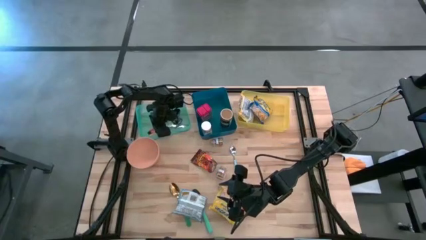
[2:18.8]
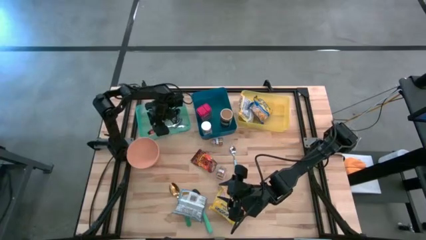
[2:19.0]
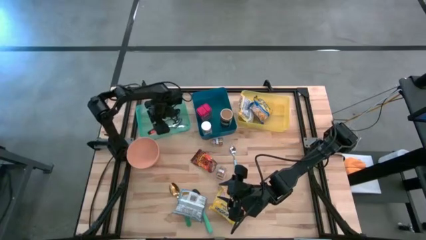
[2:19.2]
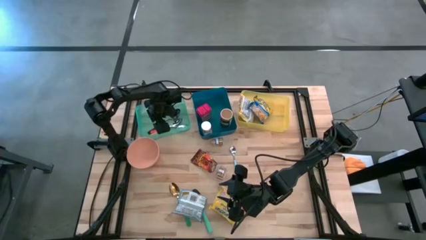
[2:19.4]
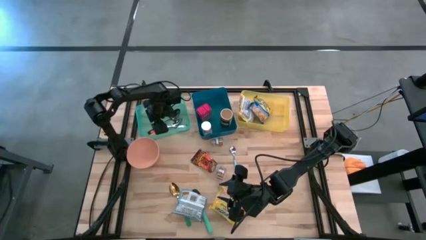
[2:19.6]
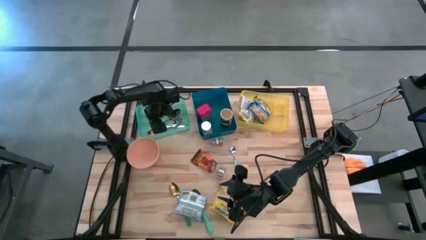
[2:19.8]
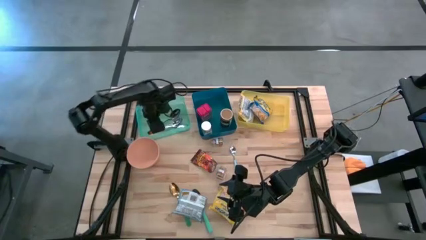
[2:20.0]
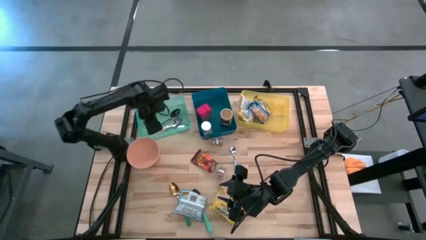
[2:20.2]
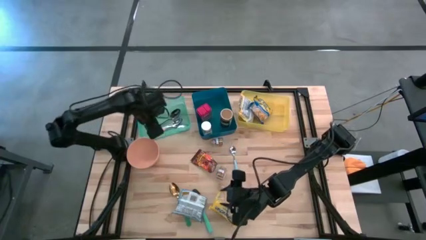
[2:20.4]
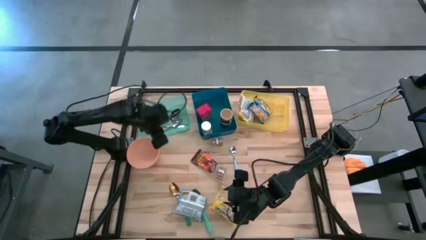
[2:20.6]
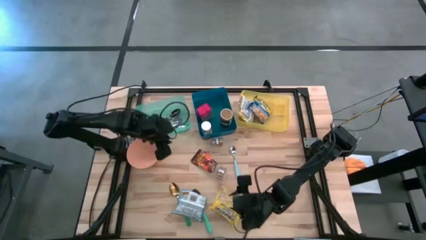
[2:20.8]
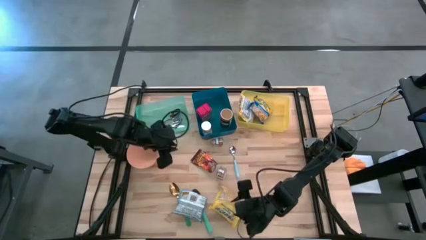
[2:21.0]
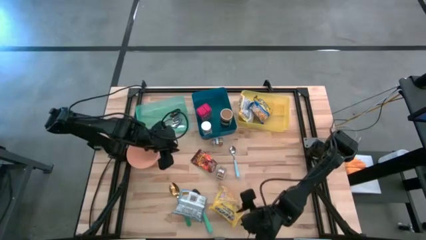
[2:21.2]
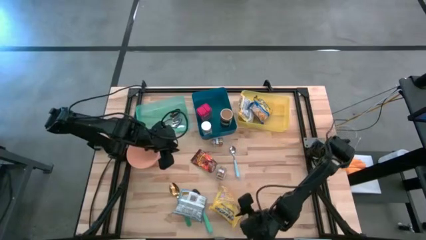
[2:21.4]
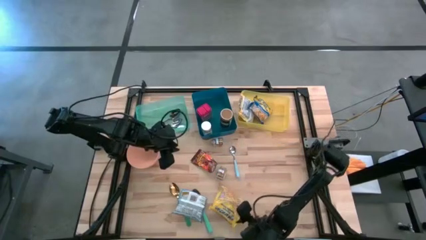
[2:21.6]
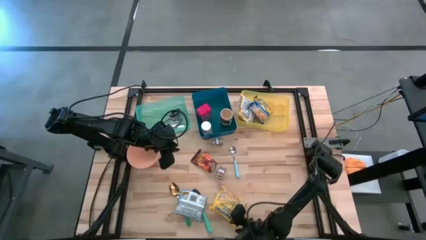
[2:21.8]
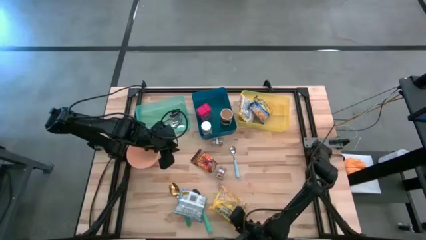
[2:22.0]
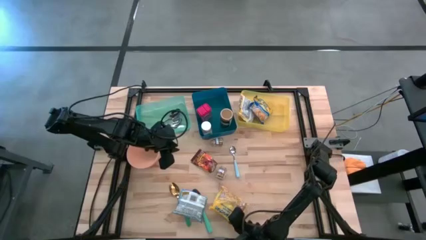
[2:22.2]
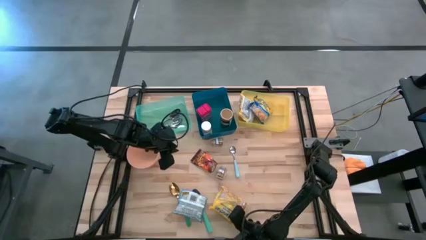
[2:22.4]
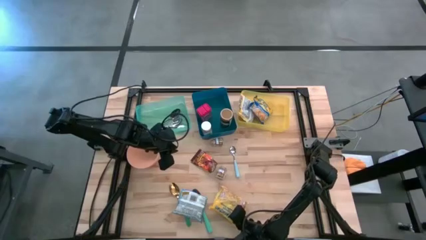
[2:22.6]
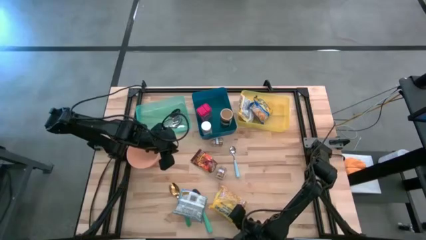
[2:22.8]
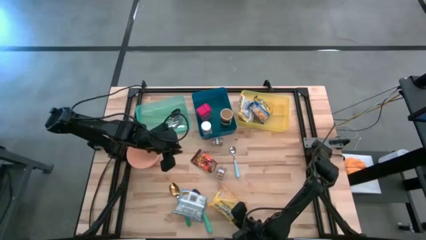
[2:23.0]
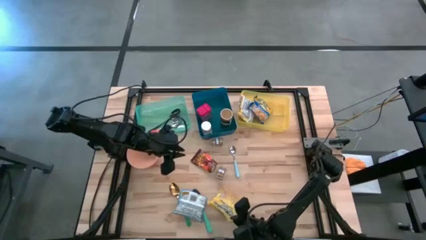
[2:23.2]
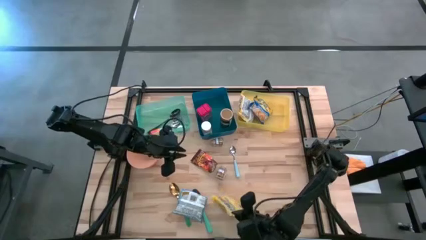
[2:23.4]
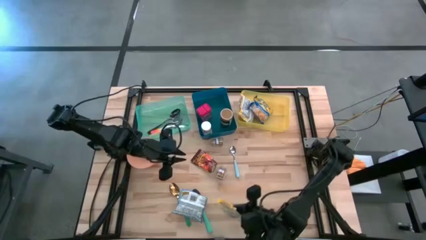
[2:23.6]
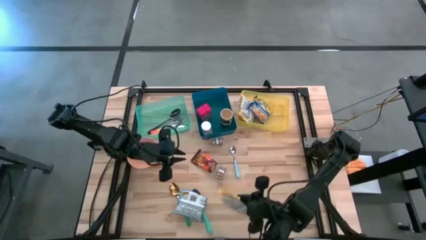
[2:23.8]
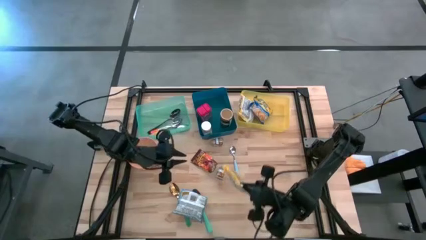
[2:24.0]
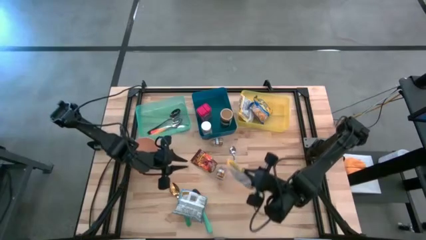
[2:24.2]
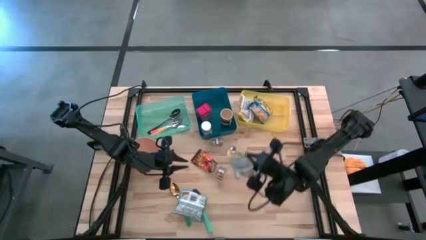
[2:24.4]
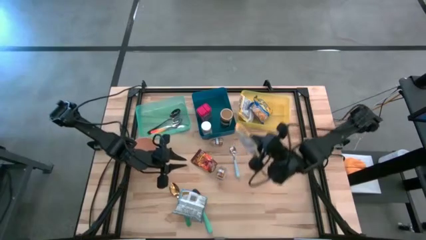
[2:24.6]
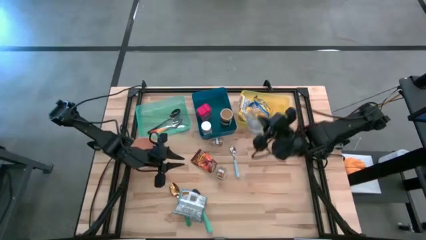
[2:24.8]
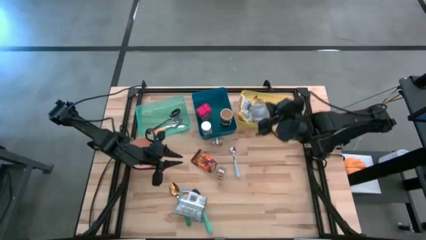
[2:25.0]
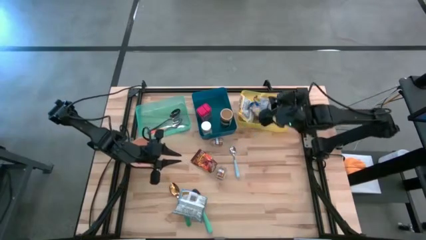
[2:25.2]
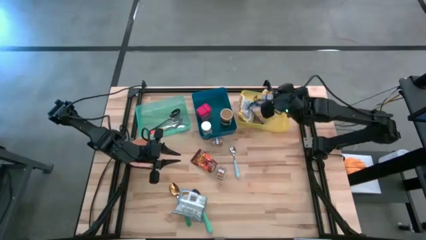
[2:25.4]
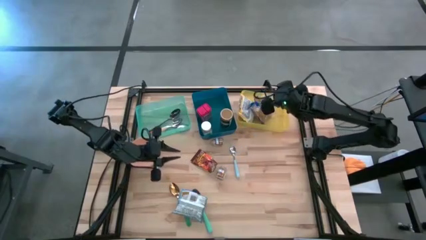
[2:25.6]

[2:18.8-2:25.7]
Put the yellow noodle pack into the yellow bin

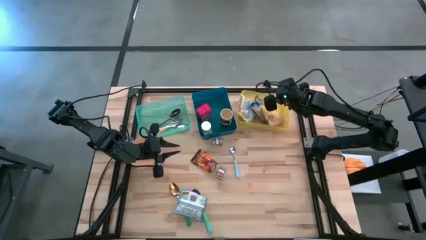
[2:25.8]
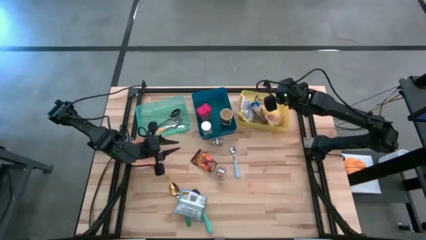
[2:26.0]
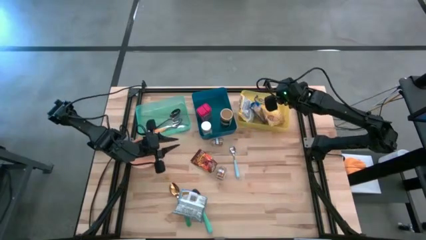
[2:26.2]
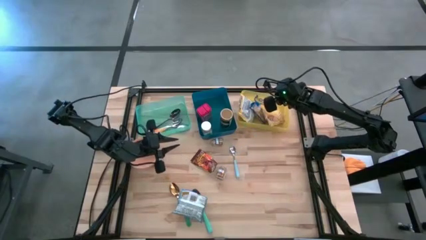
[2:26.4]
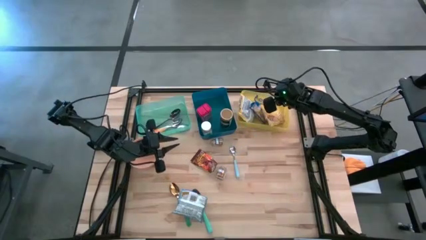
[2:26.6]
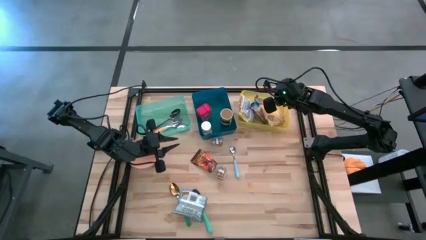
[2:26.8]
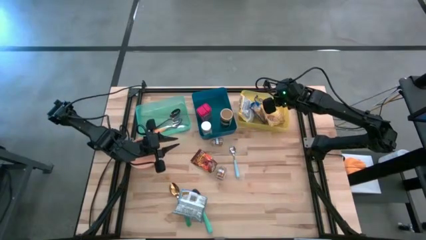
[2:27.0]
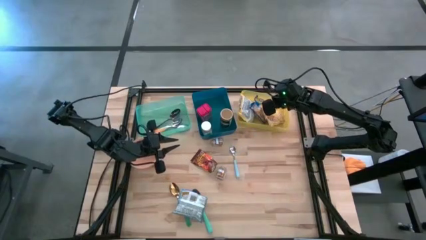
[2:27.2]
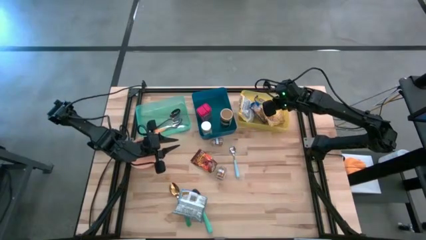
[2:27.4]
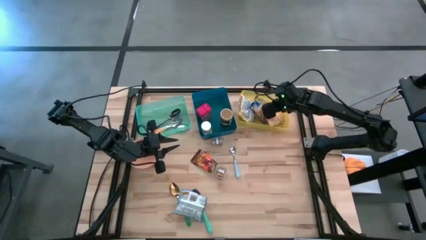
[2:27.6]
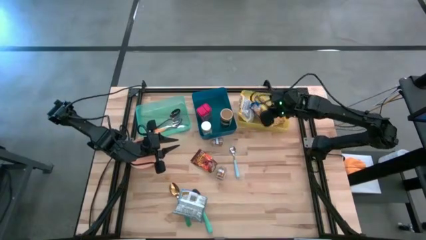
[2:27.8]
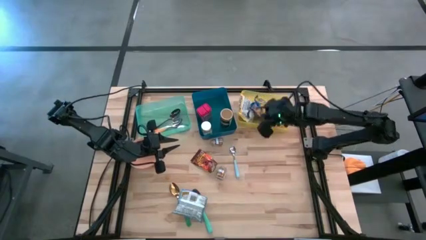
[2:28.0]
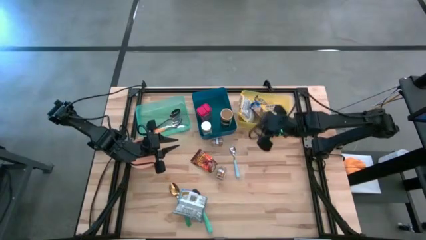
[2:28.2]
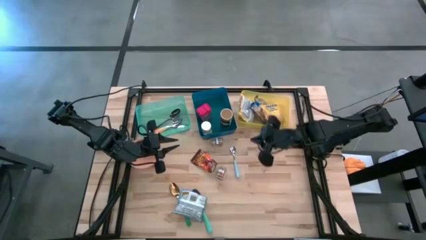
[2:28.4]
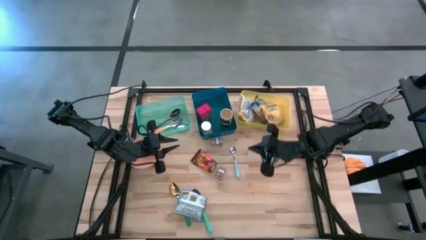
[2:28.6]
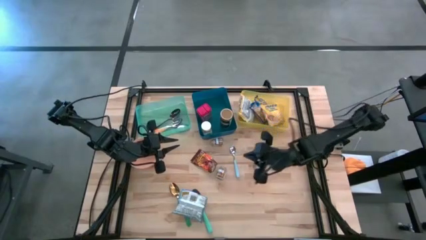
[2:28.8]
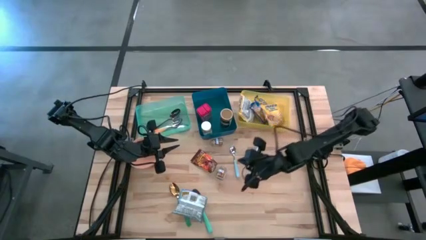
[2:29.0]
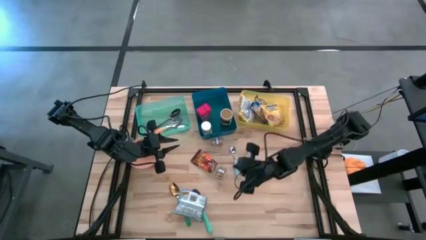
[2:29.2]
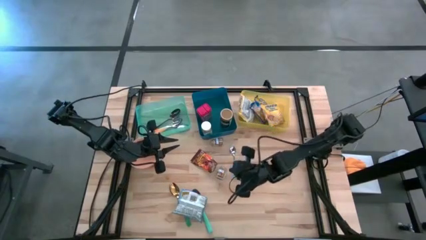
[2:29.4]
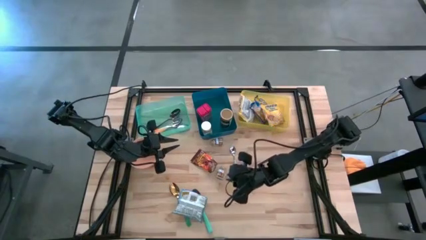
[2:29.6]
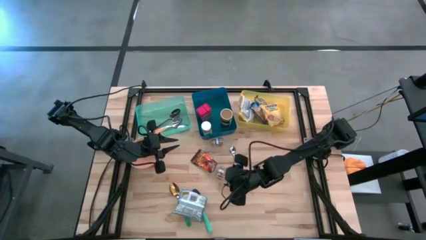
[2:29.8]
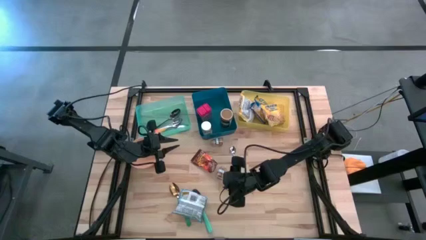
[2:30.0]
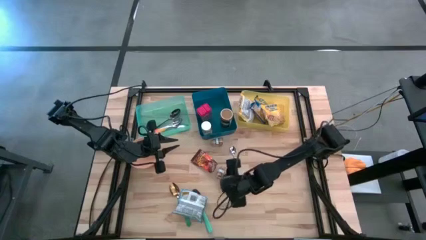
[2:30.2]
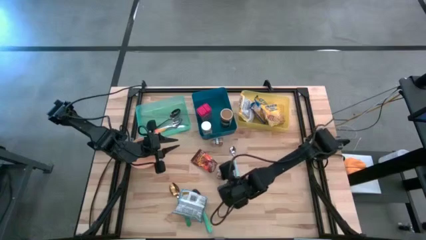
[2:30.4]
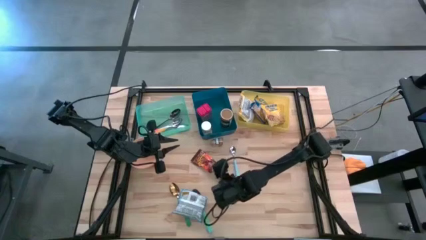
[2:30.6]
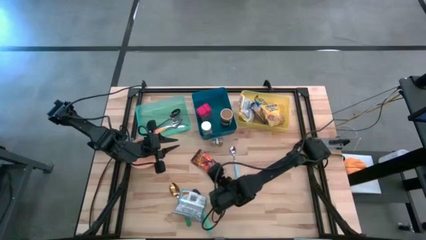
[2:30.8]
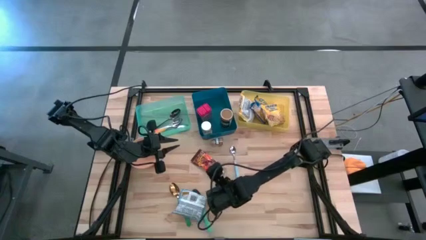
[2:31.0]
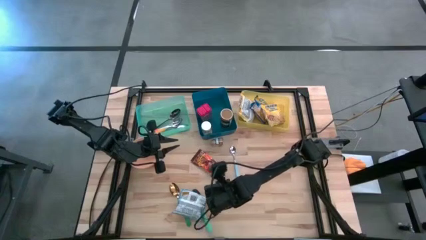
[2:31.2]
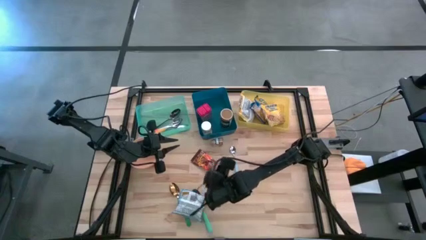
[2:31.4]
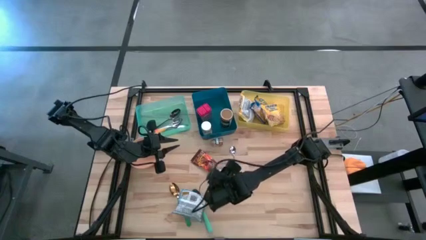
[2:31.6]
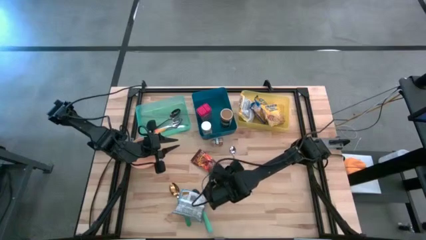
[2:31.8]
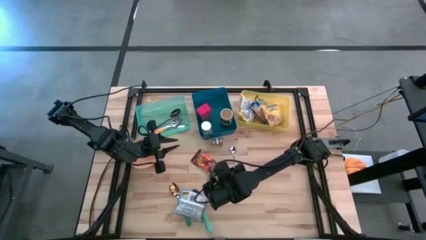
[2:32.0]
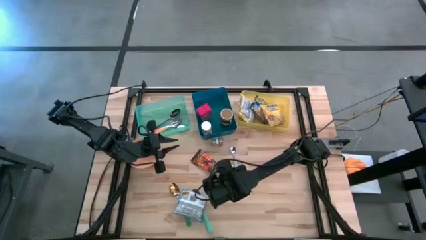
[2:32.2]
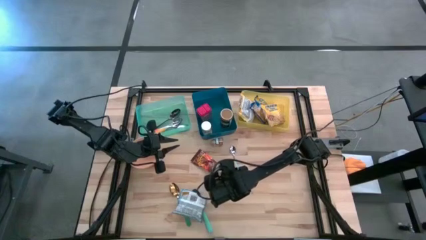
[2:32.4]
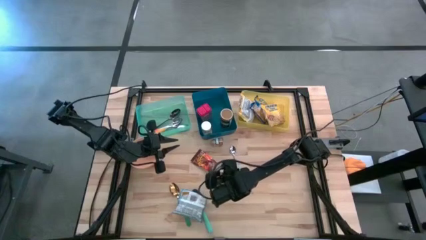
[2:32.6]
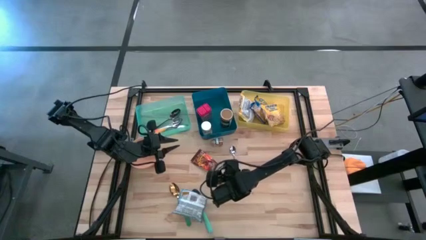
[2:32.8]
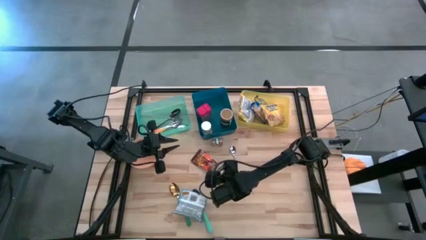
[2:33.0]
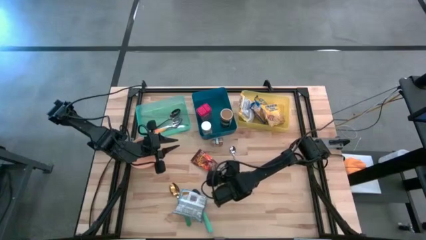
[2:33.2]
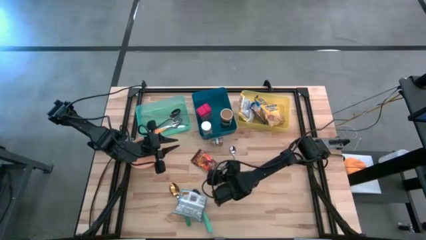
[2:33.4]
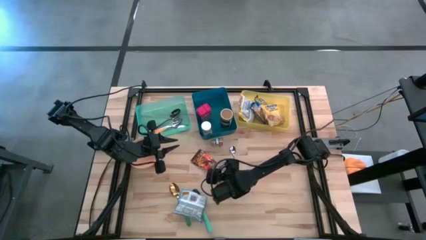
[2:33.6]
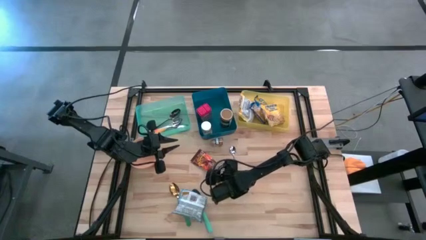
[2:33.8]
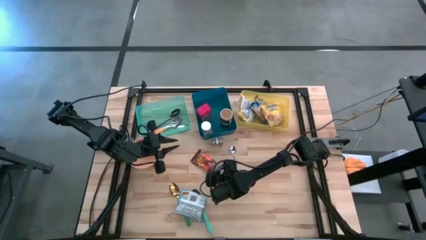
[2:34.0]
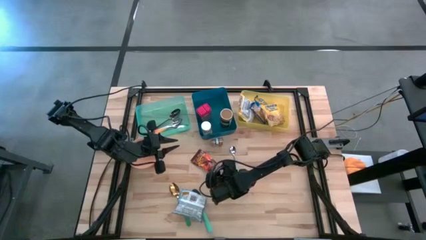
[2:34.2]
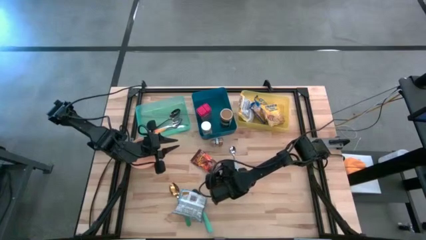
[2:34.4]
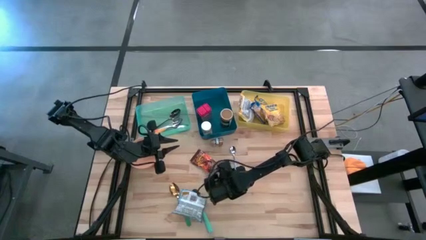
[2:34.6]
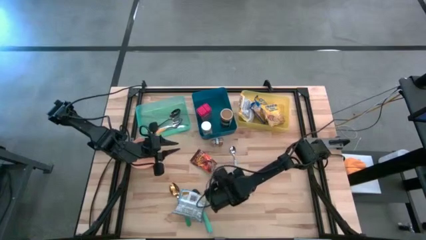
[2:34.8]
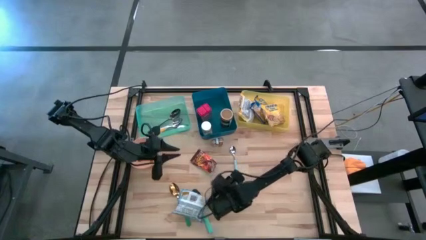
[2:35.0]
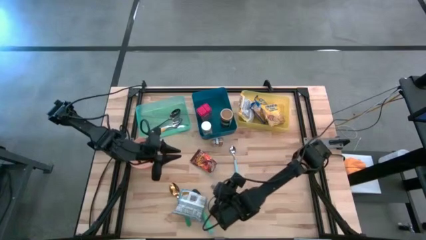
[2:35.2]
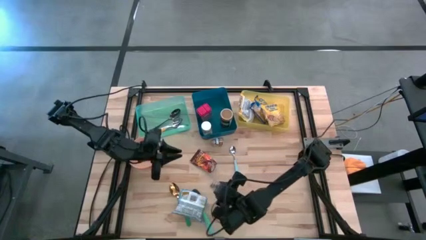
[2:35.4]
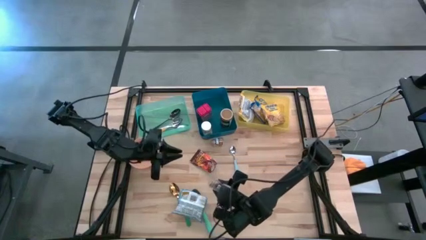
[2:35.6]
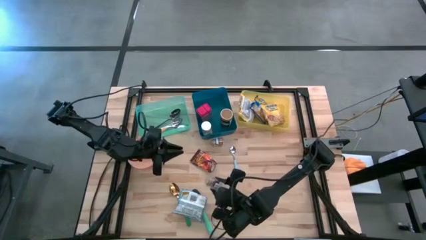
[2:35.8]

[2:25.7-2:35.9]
Put the bottom brown seasoning bottle into the blue bin
